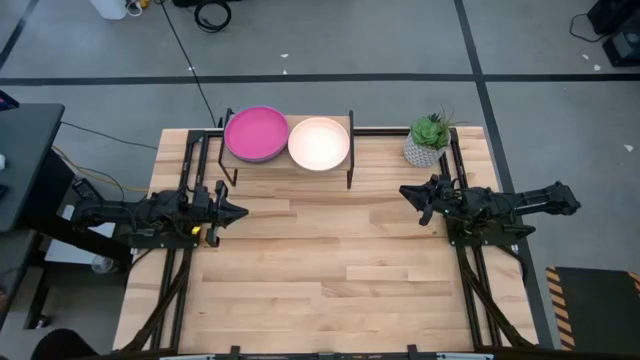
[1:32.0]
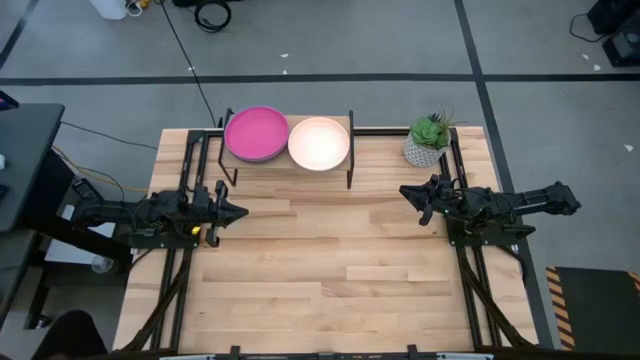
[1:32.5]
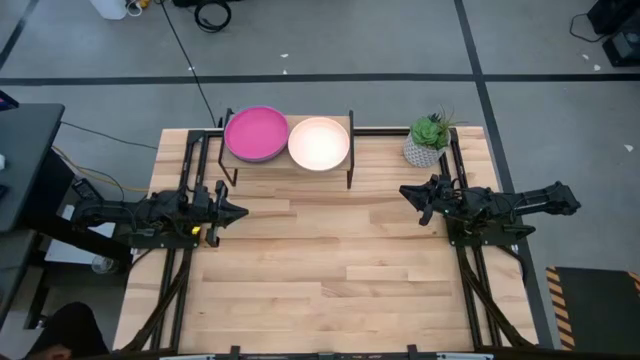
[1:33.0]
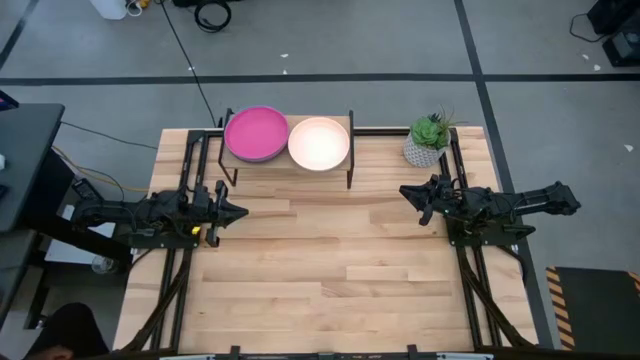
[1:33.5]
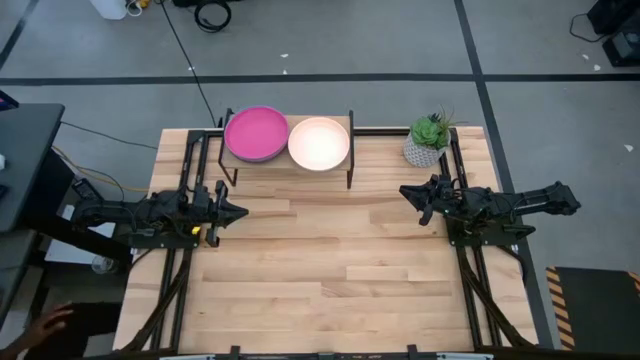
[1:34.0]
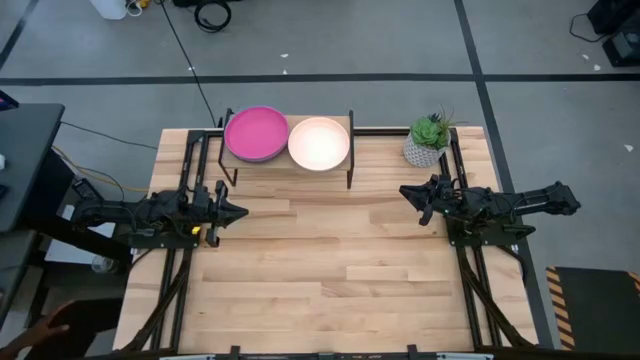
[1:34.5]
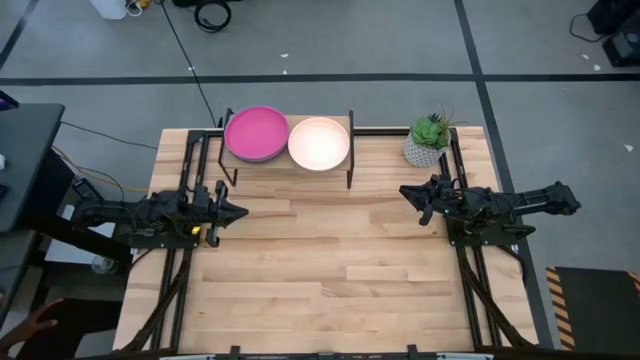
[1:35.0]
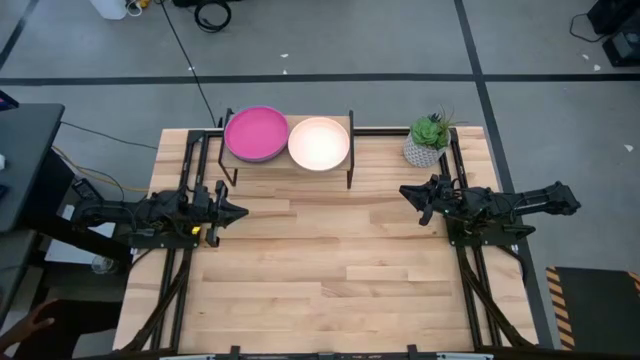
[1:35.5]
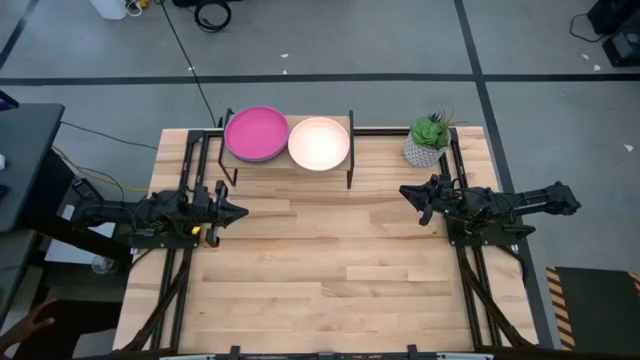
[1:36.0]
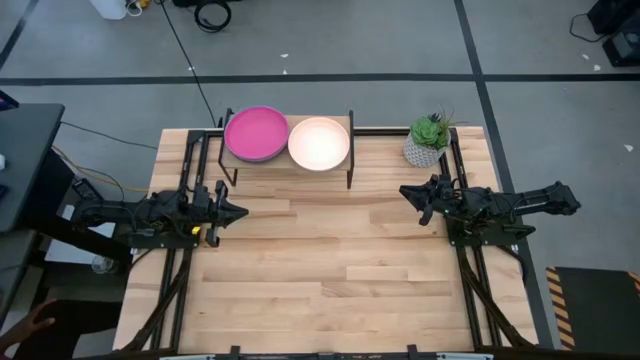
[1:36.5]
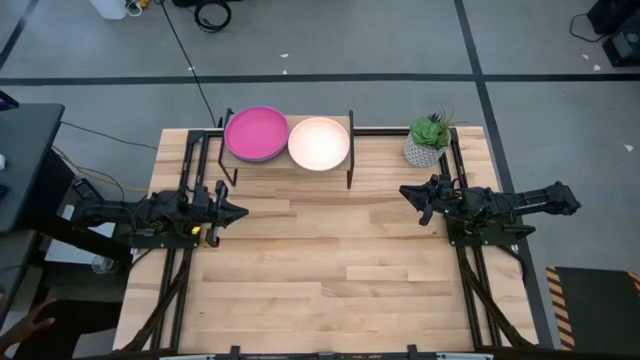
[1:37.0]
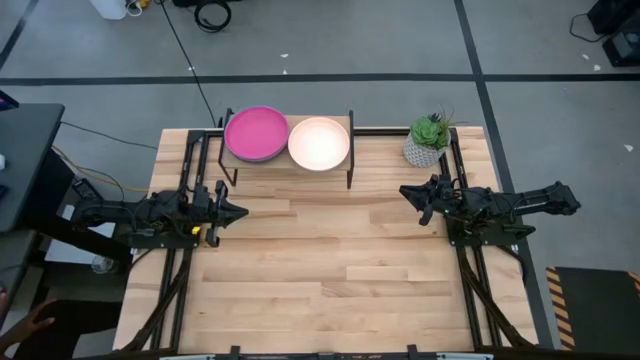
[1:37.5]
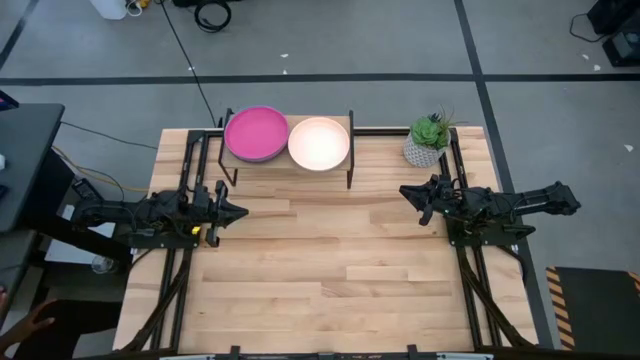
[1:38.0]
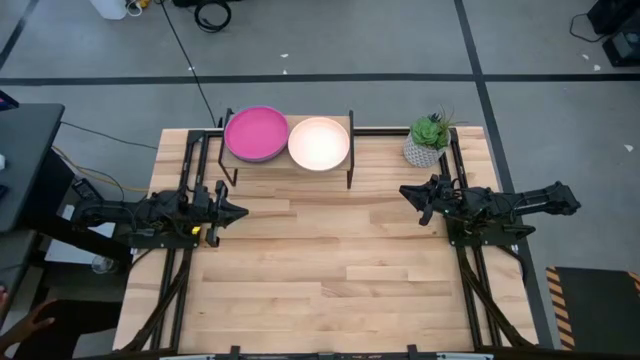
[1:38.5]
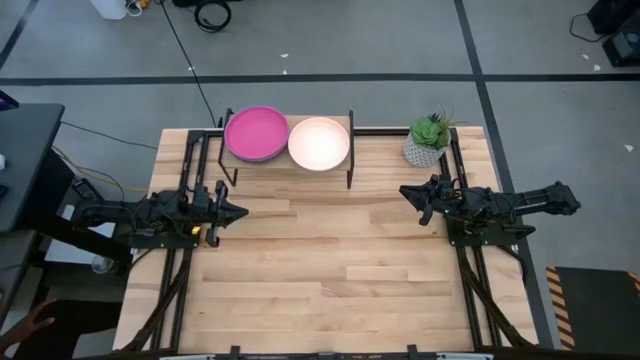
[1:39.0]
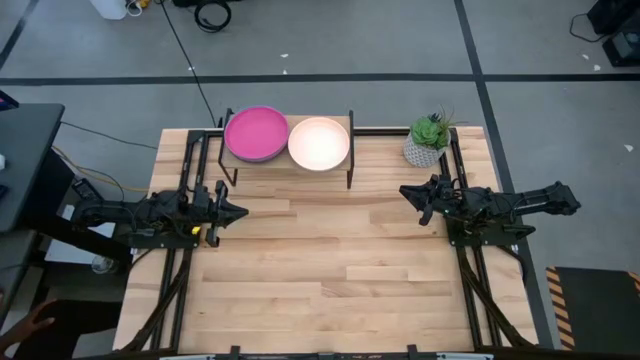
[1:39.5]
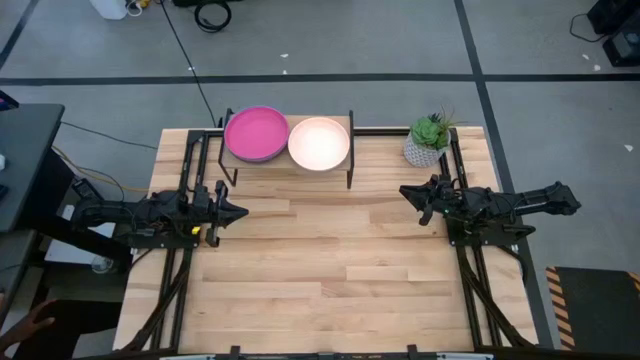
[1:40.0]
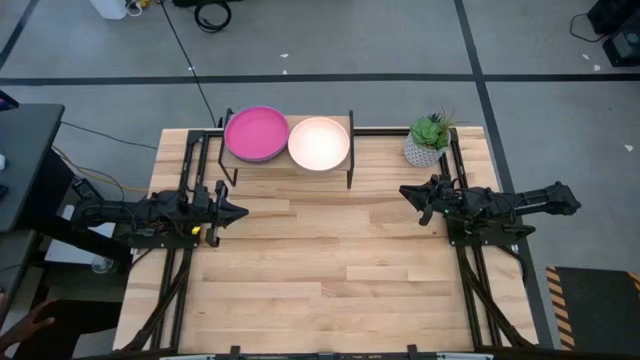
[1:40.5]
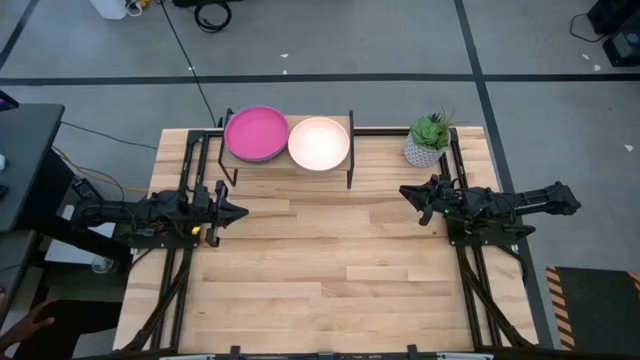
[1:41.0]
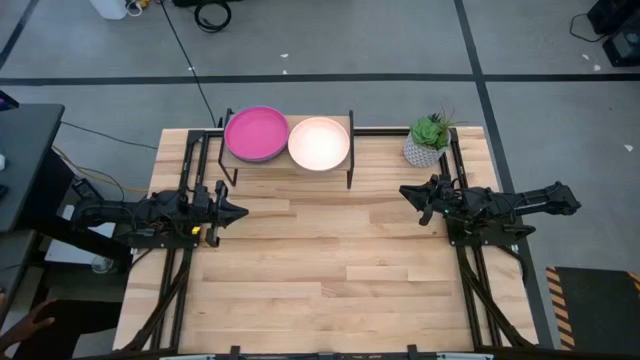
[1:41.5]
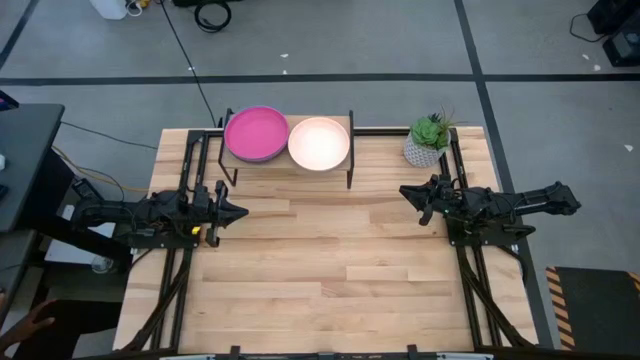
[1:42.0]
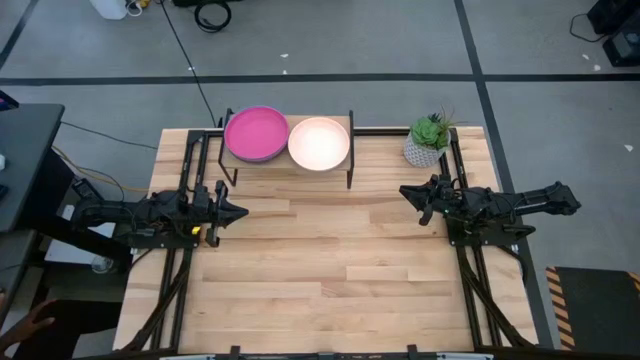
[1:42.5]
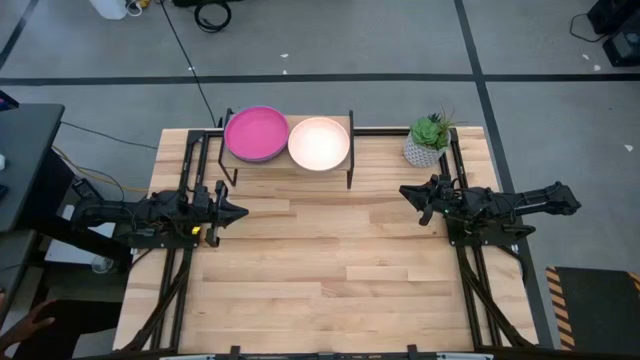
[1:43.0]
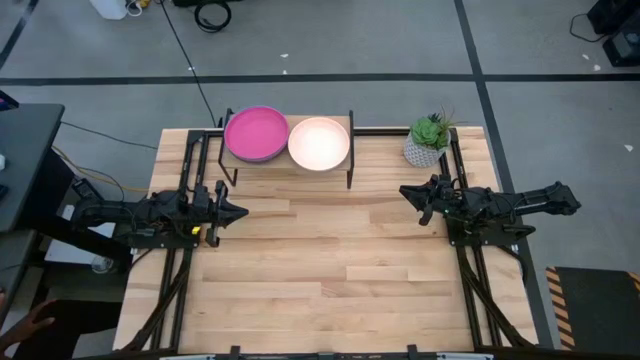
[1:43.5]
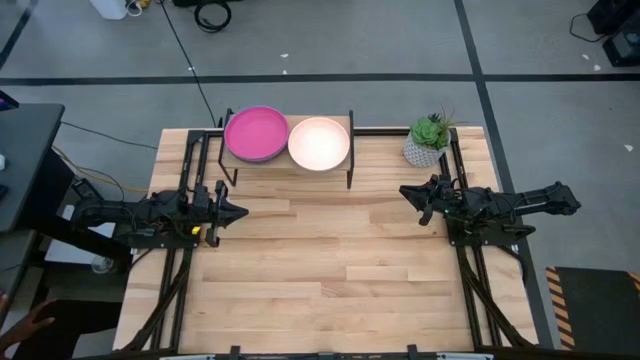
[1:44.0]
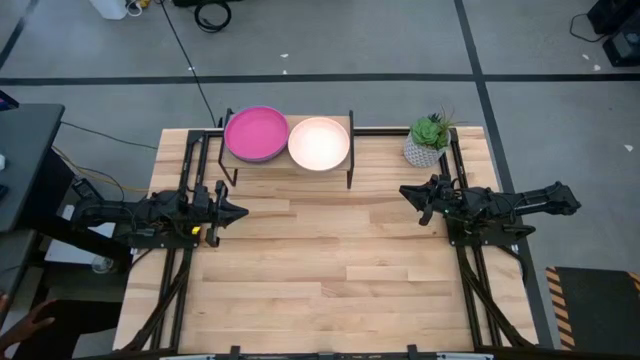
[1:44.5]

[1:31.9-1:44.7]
Task: Place and stack plates onto a shelf
Return to Home Position

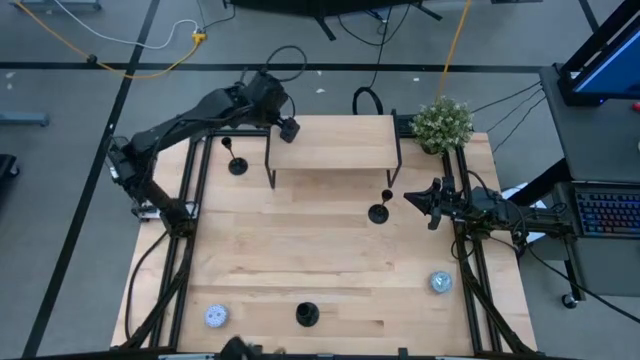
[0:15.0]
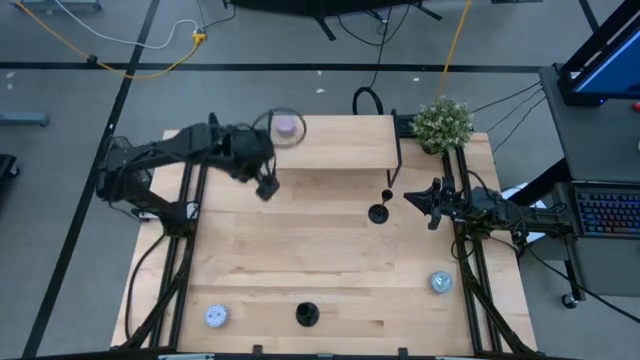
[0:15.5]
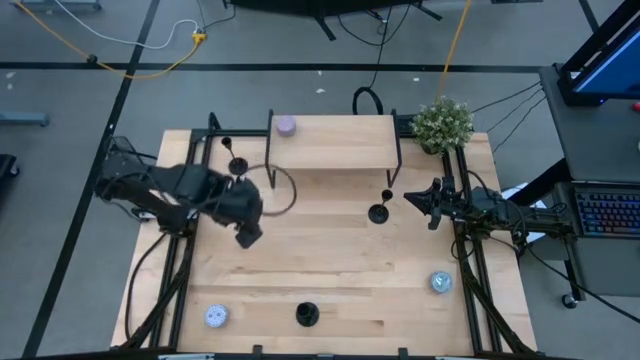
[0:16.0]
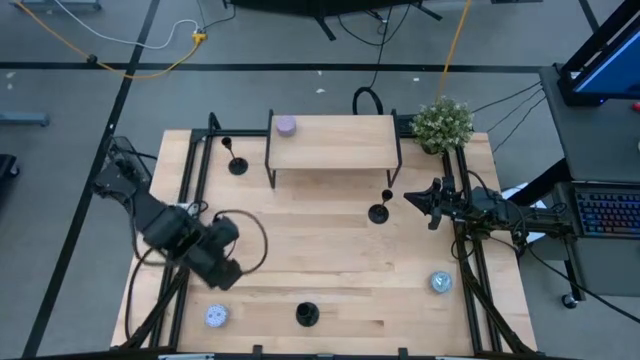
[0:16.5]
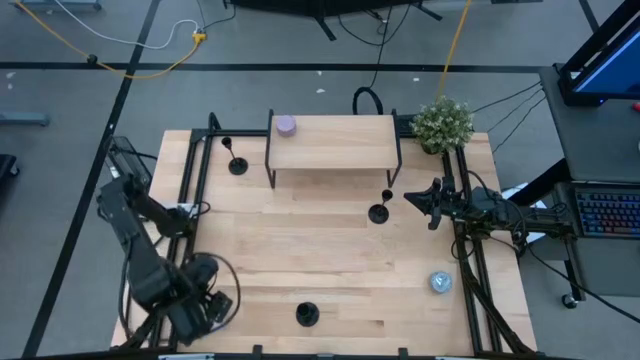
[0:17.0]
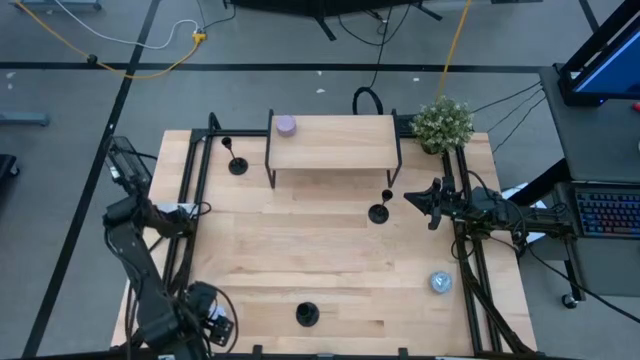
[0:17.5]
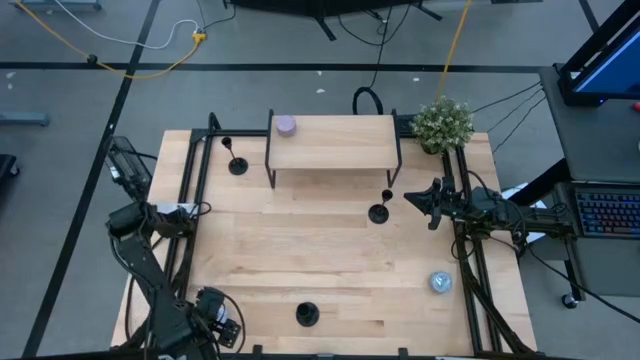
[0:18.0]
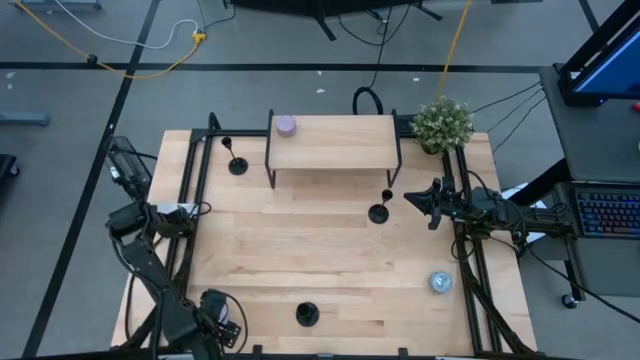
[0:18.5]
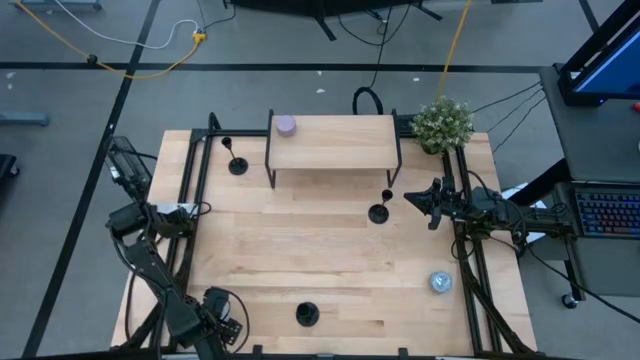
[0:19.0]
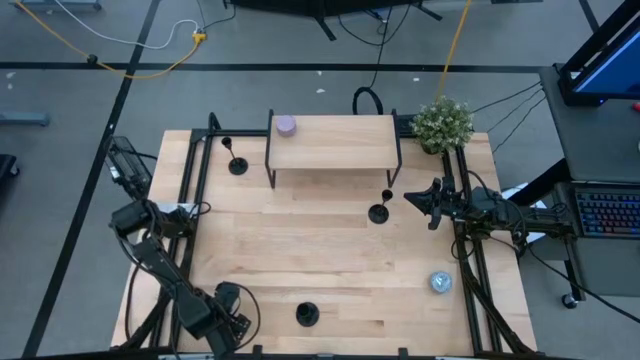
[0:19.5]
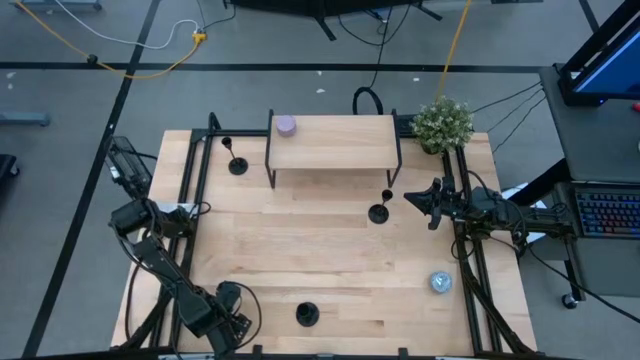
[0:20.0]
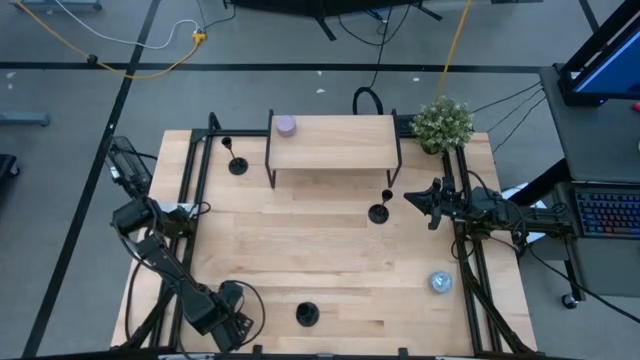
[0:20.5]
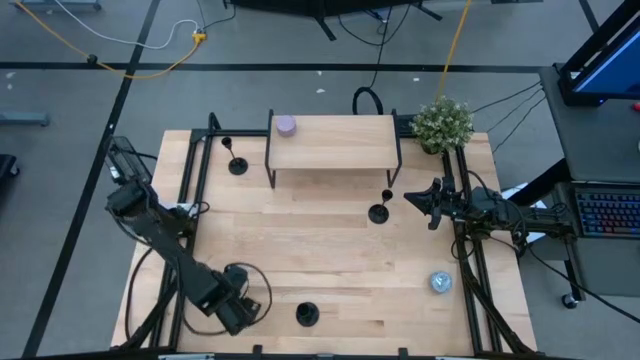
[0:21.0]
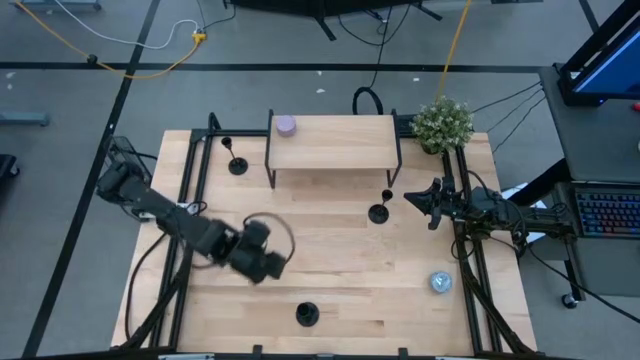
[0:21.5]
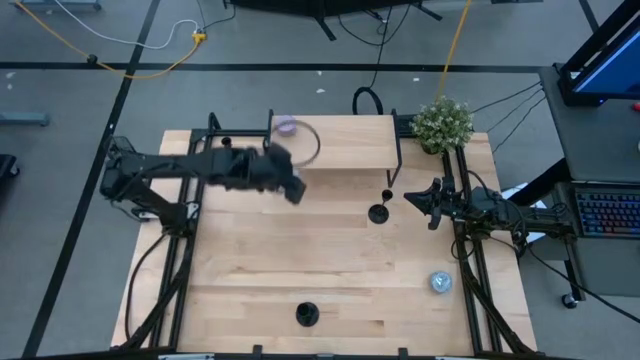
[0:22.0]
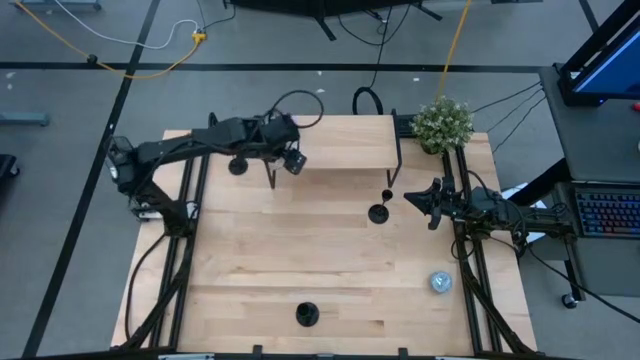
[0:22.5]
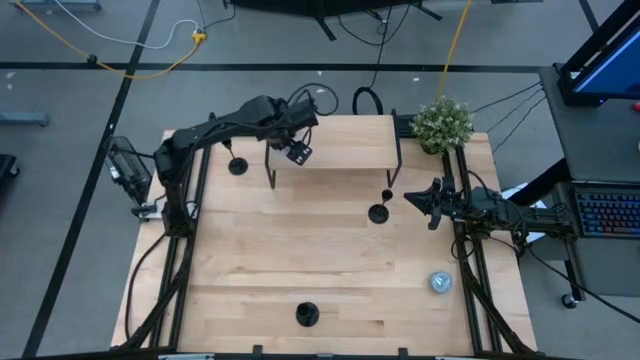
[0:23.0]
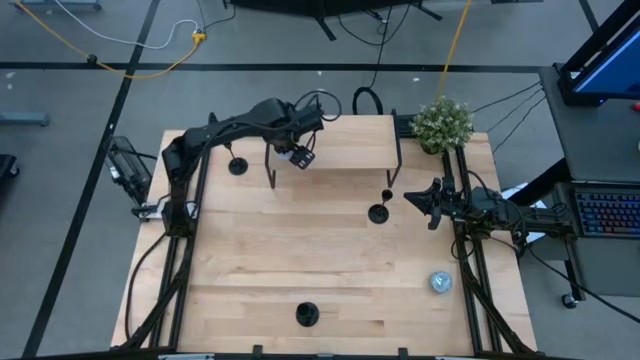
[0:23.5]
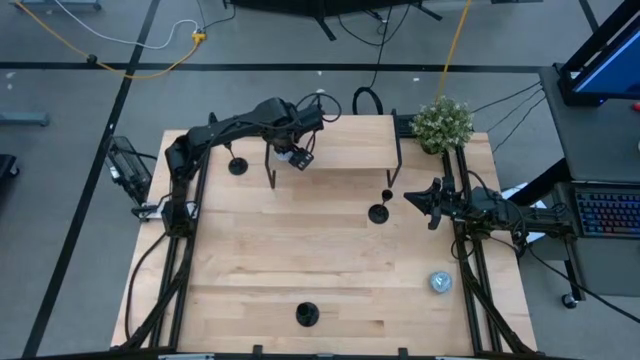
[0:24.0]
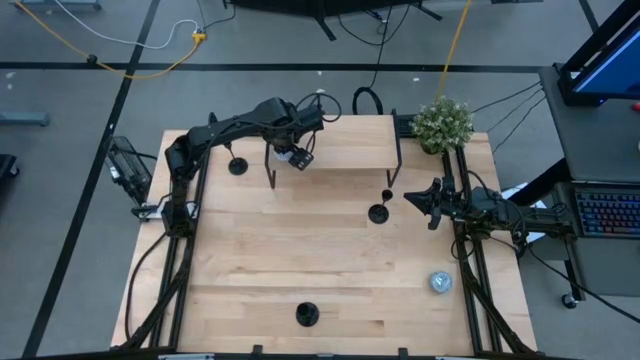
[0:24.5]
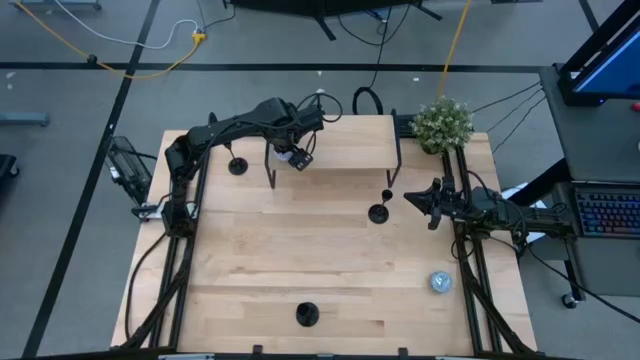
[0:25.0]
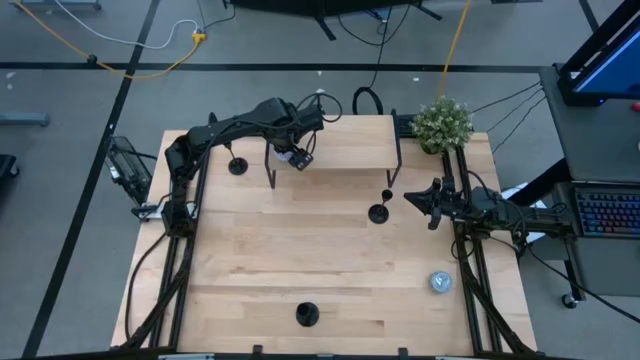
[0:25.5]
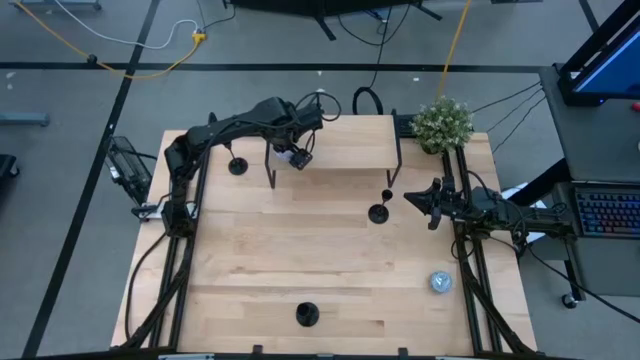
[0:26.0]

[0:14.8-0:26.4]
Task: Pick & Place candle stick holders
Put the white patterned scented candle on the shelf
